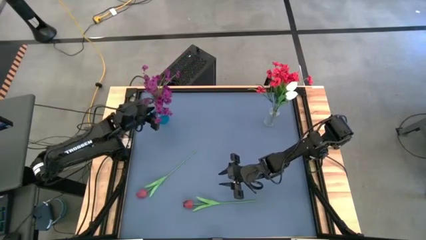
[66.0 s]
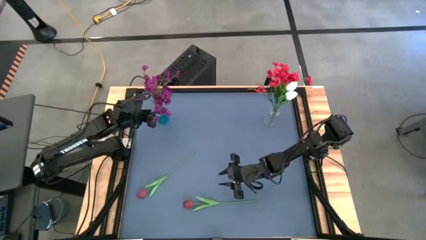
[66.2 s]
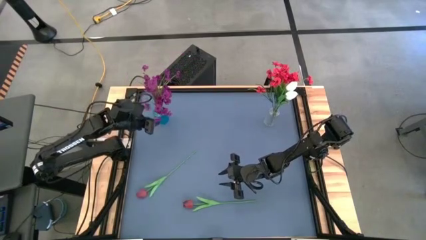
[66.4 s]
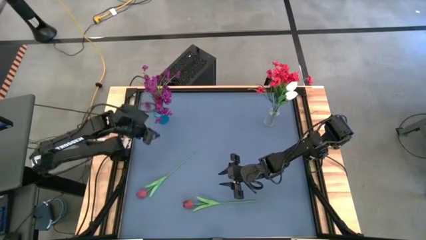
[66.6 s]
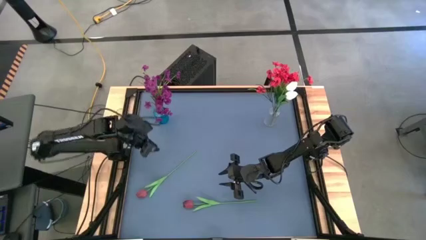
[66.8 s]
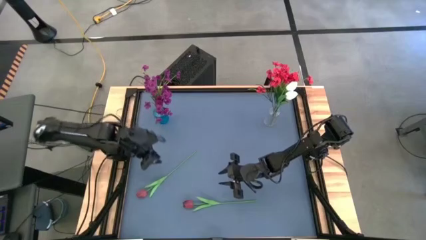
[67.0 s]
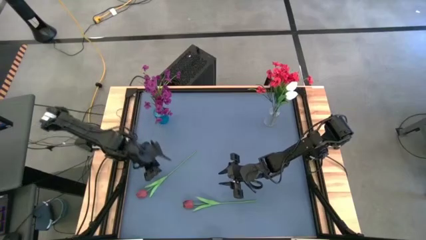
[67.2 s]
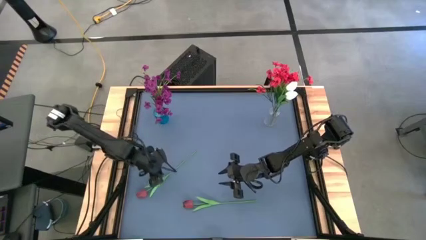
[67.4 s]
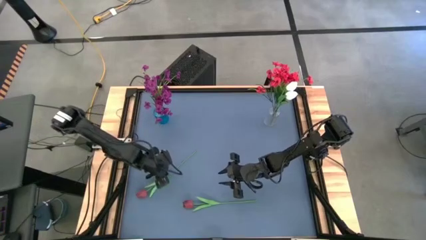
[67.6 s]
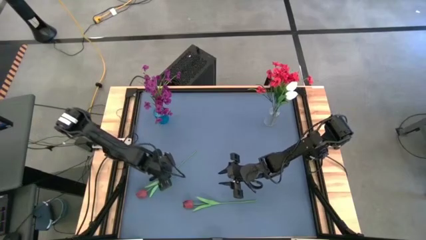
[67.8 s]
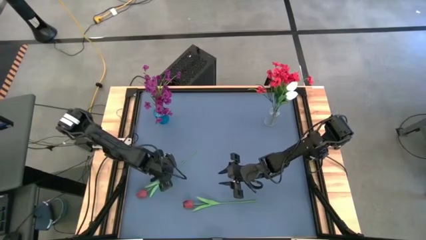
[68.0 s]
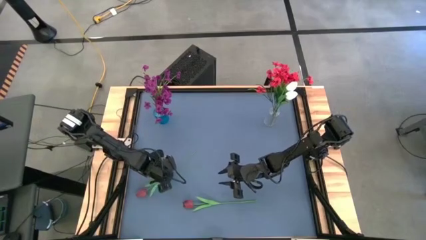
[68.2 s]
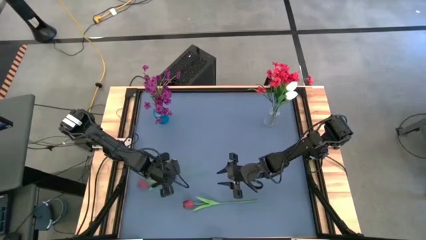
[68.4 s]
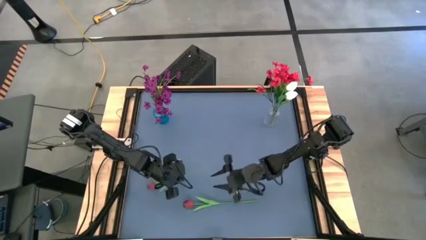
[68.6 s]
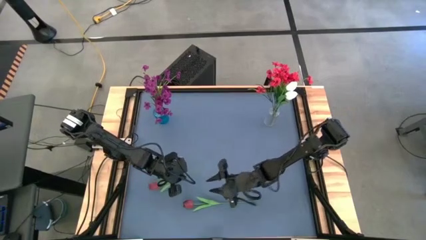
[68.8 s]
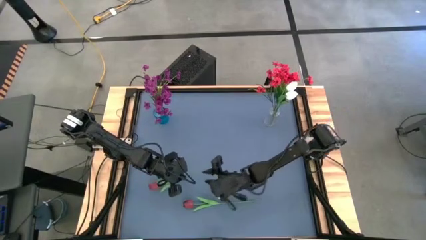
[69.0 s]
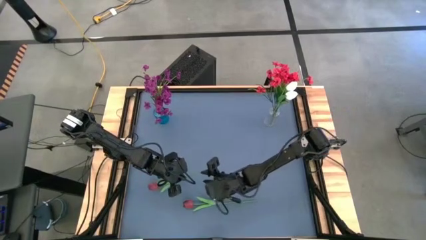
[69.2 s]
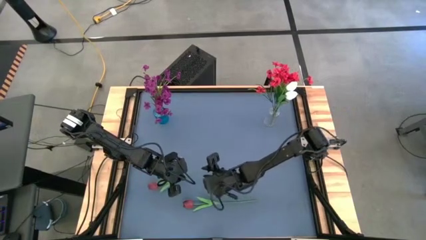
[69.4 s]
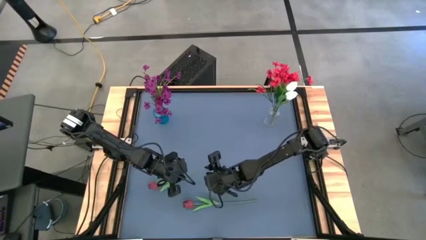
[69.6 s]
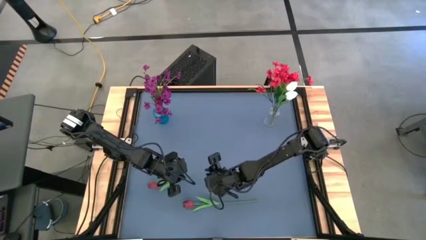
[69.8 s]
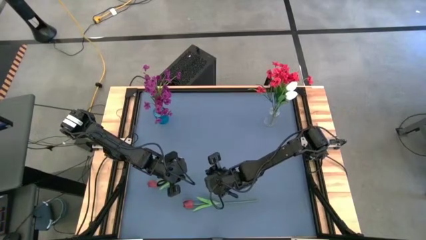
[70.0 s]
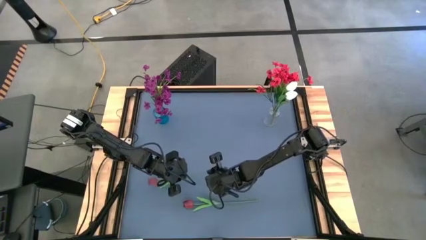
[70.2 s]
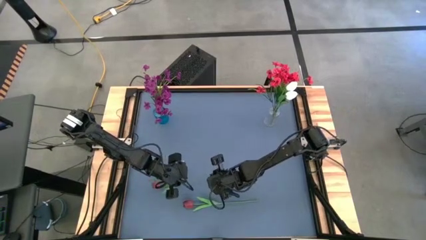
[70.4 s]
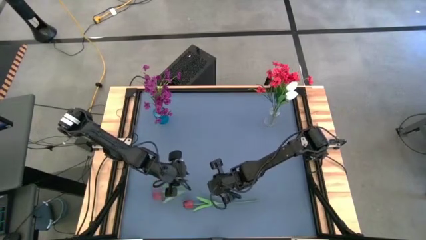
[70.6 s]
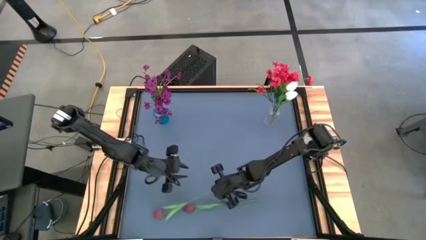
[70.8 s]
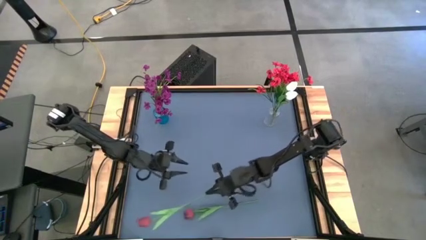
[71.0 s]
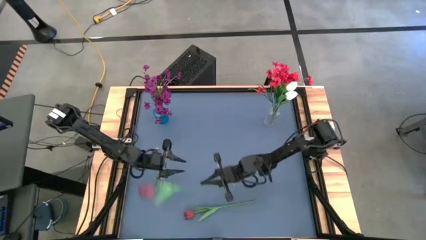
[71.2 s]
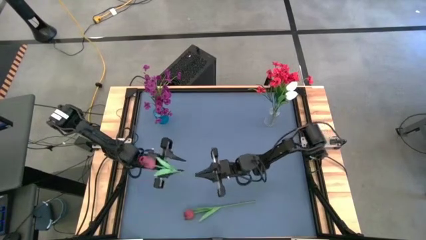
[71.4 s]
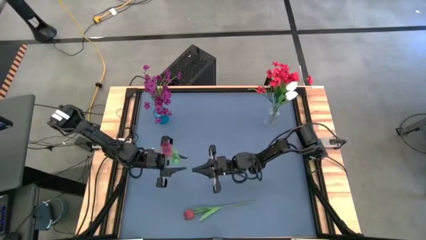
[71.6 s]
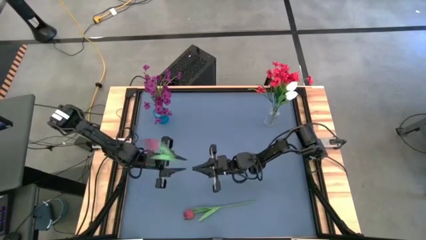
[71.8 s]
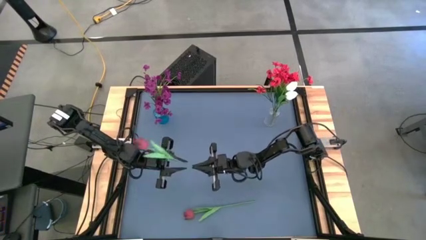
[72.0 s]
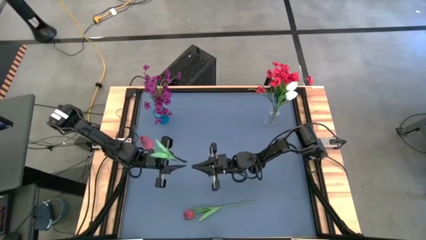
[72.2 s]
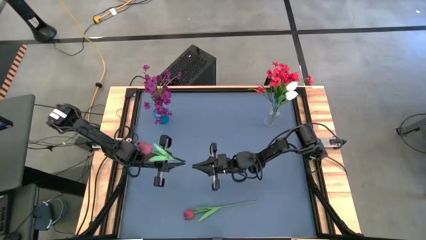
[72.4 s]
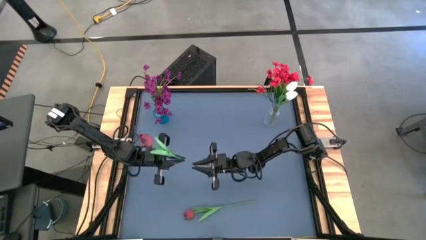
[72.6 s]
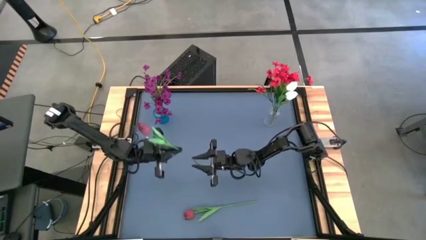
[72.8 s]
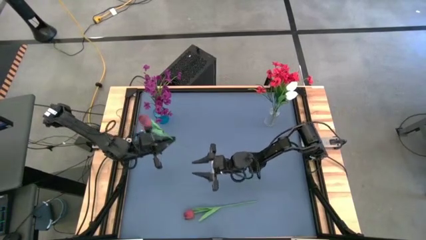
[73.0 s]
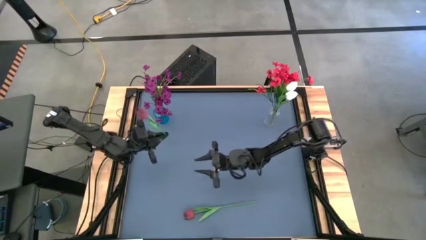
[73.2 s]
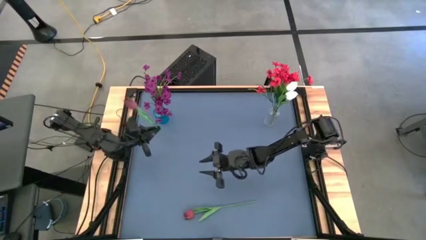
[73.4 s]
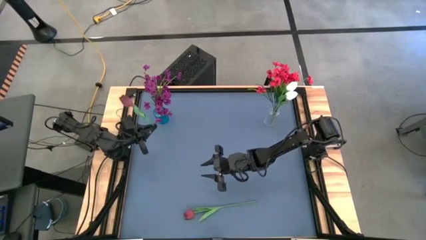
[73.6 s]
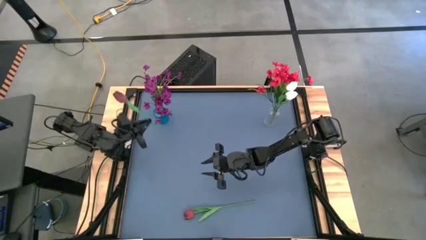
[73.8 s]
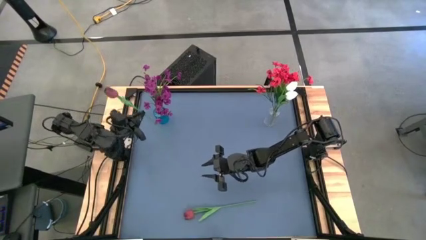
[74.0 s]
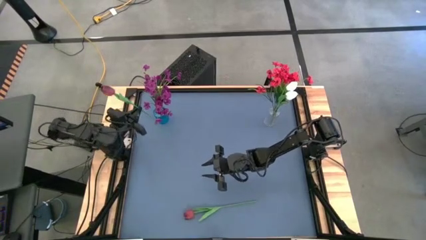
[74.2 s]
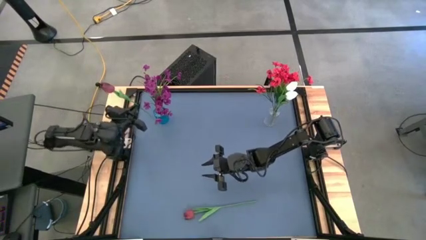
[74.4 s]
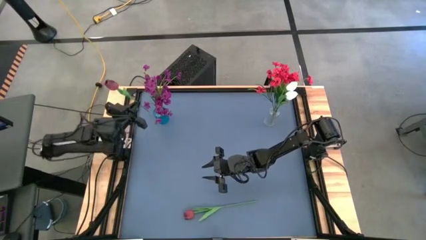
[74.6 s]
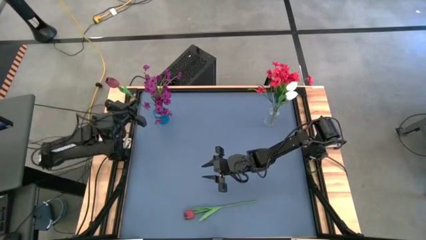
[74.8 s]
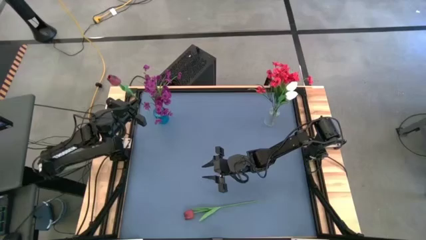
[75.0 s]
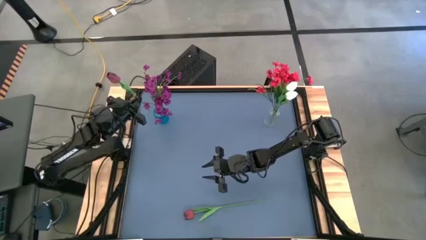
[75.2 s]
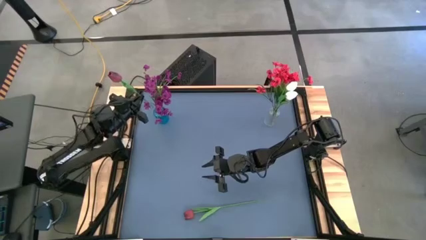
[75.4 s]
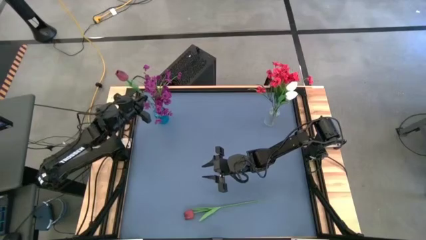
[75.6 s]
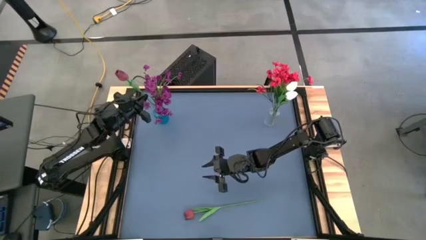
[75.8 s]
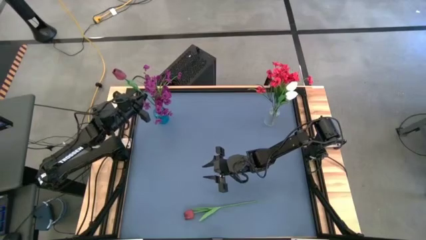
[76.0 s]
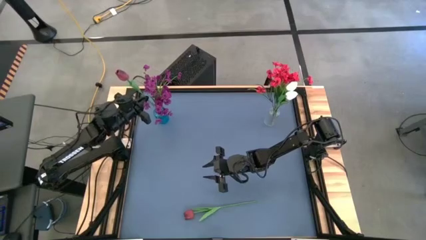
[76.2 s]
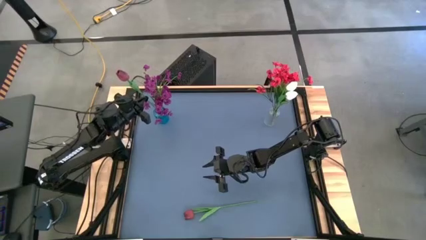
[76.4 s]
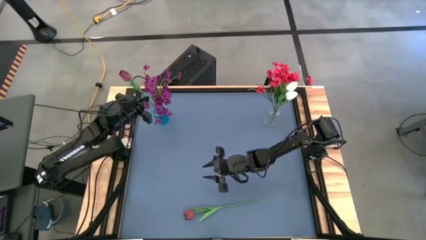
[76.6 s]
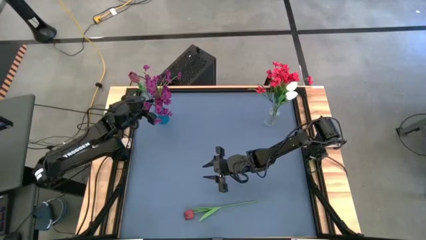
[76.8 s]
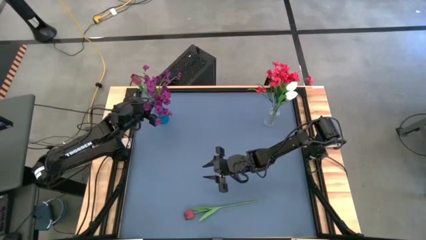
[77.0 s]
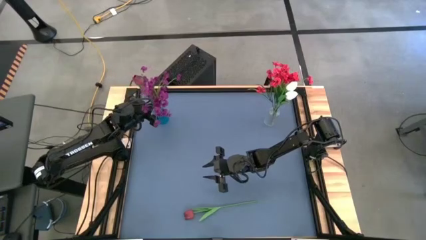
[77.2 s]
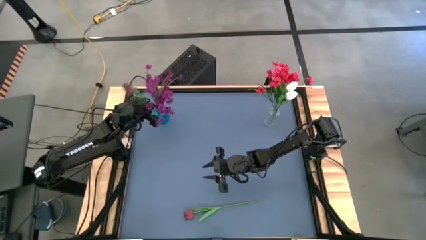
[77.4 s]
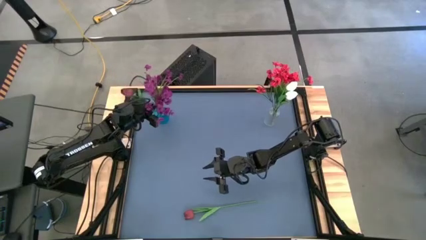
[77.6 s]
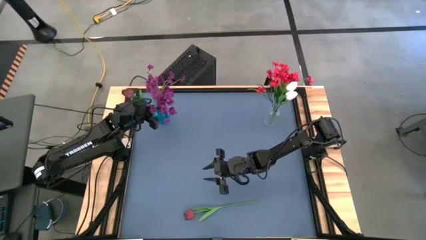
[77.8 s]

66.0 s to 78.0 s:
Task: Sort flowers into vase by color
Put the left red tulip into the blue vase

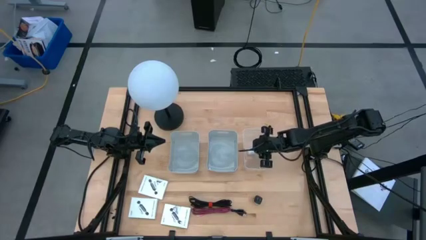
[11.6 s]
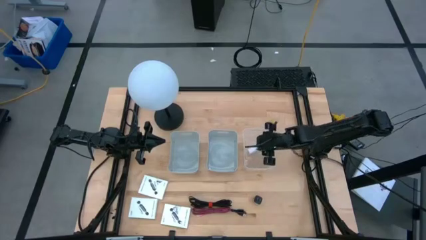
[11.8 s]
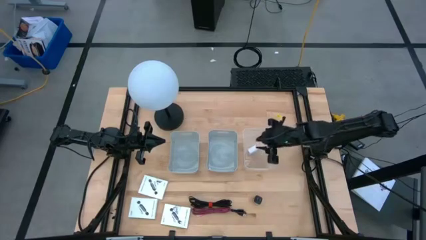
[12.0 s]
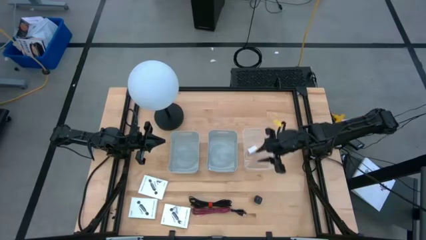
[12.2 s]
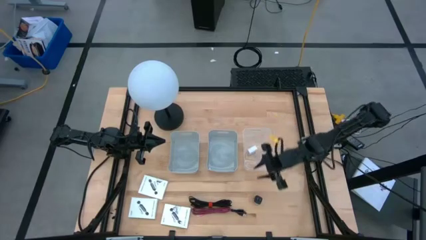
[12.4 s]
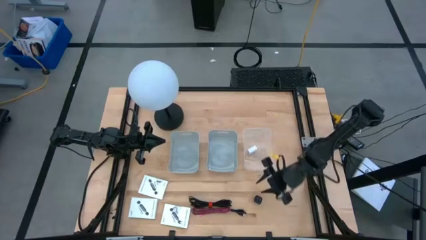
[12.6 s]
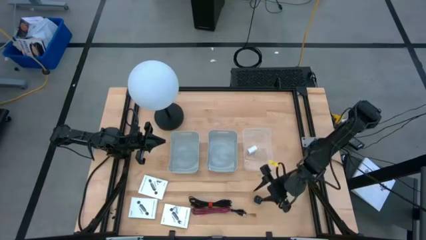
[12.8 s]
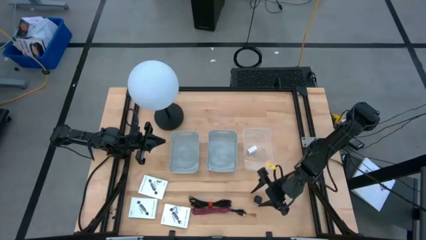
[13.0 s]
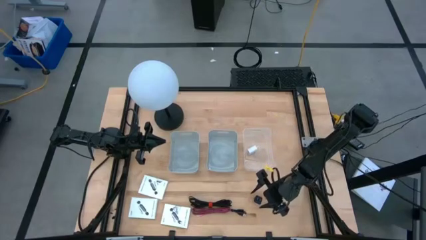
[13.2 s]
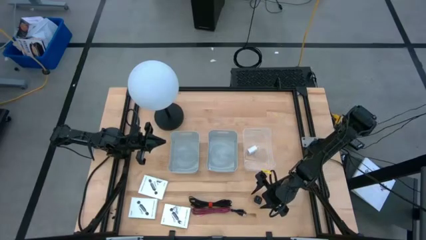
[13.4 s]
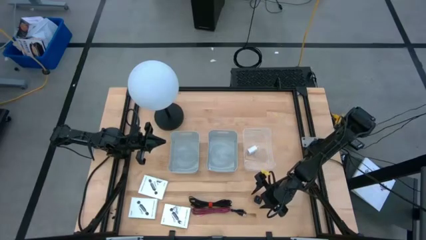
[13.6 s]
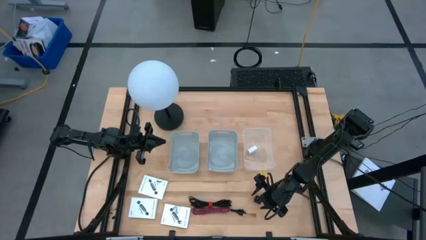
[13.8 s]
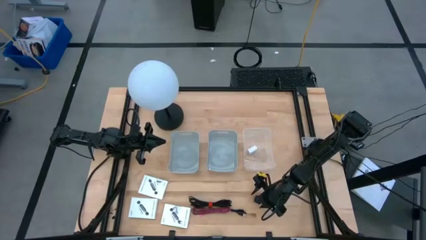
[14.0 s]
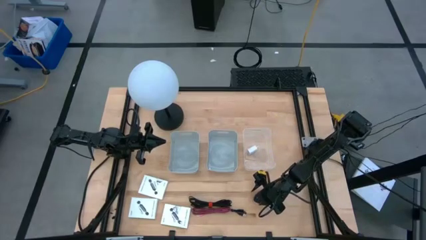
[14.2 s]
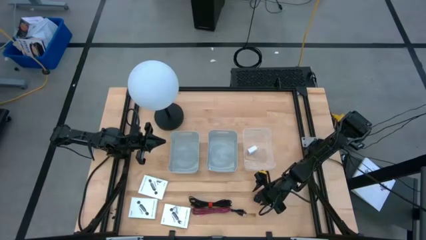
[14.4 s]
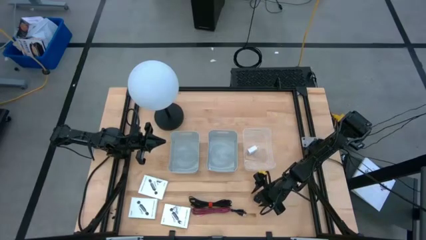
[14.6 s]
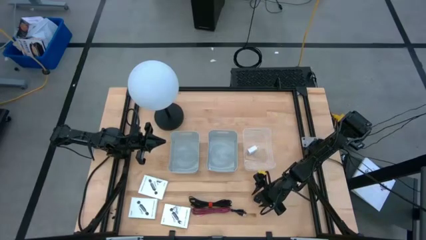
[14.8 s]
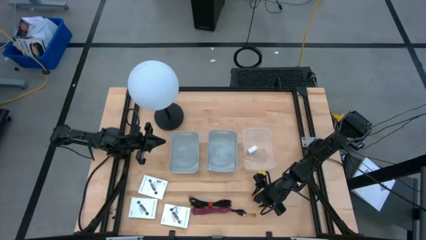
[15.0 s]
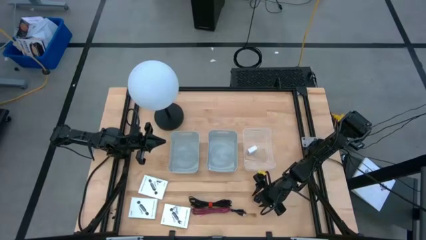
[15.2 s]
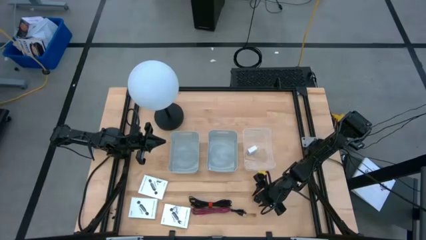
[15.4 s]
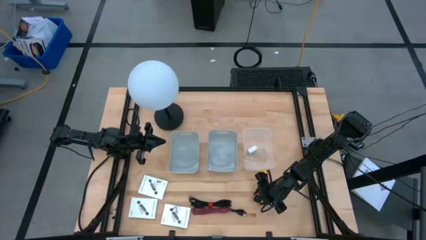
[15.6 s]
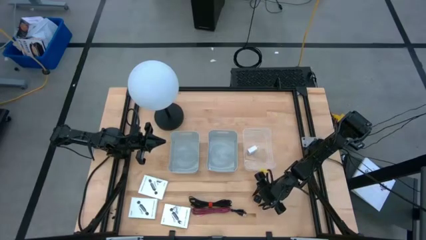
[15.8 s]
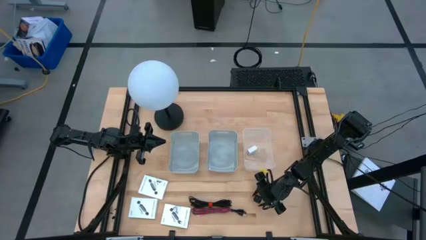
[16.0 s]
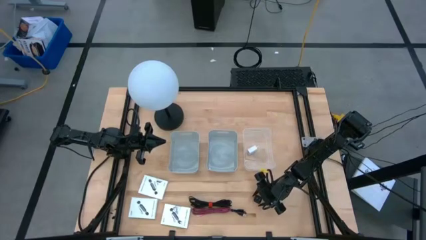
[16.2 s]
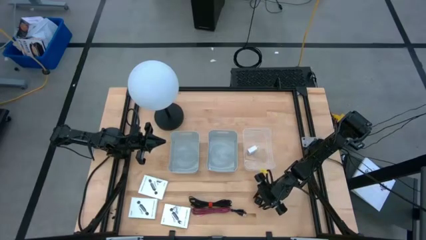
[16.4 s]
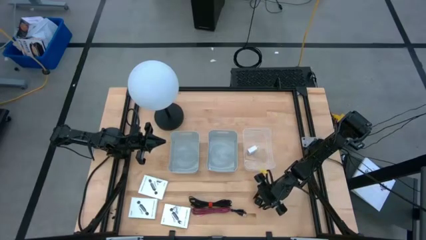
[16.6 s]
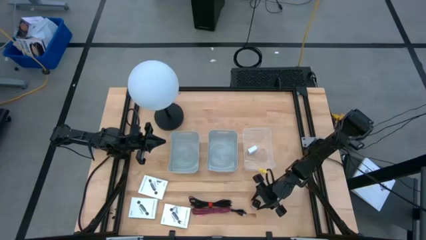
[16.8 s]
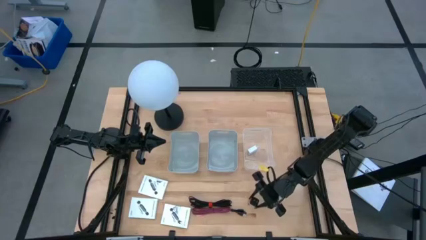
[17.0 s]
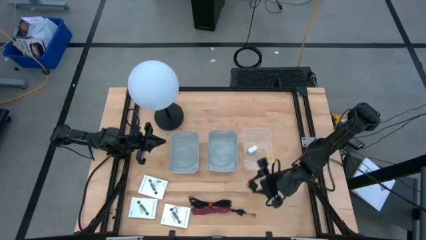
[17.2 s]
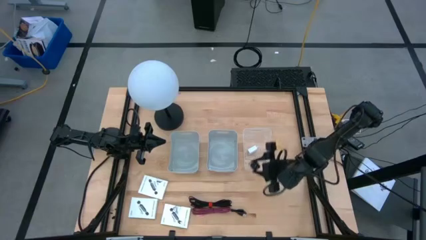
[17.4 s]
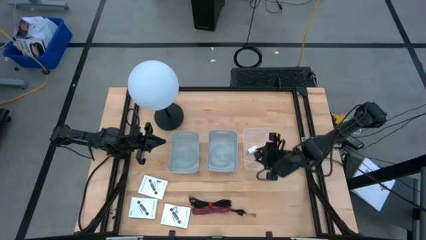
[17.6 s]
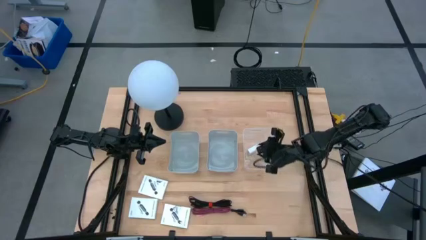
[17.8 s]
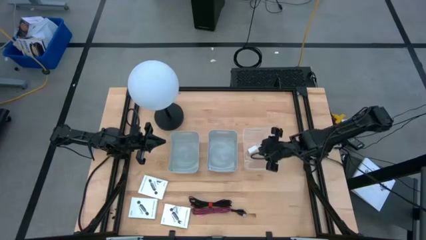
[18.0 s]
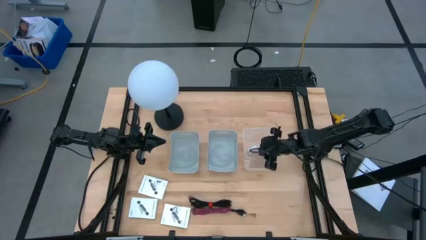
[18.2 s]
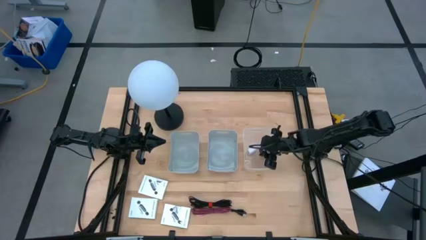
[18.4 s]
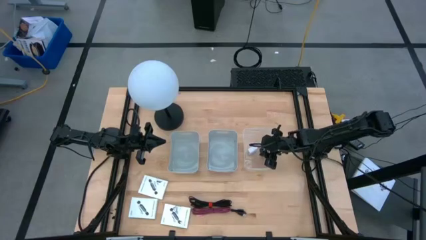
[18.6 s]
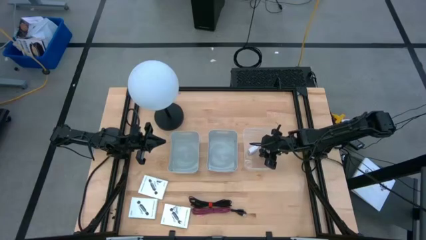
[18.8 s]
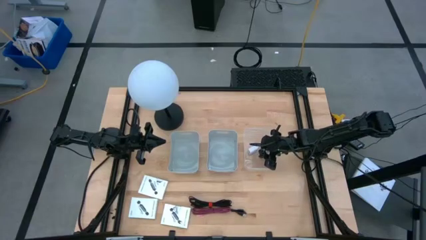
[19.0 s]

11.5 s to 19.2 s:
Task: Pick and place items into bin
Put the black charger adapter into the transparent bin
